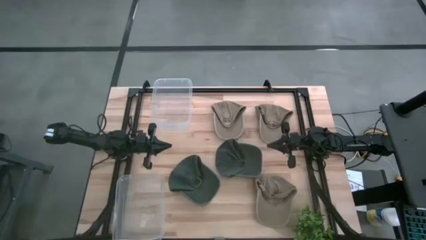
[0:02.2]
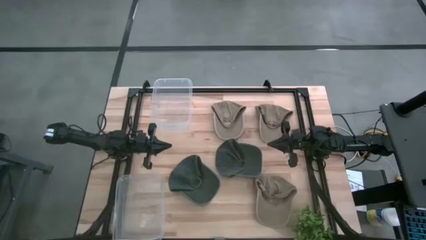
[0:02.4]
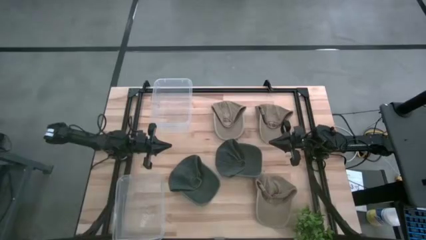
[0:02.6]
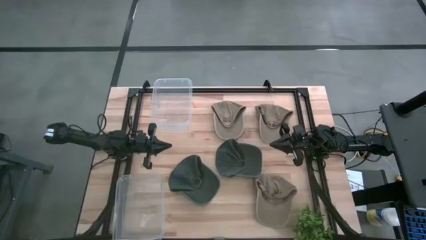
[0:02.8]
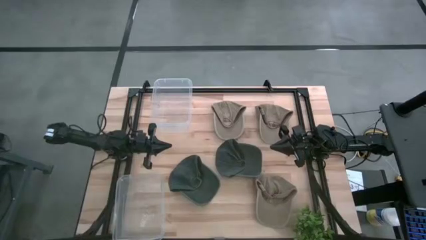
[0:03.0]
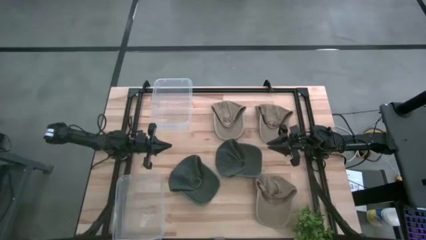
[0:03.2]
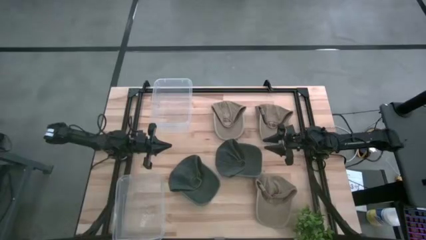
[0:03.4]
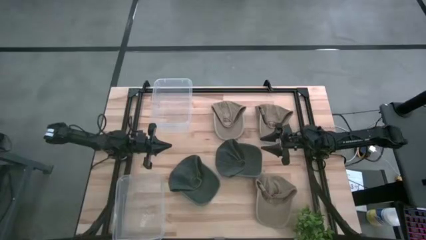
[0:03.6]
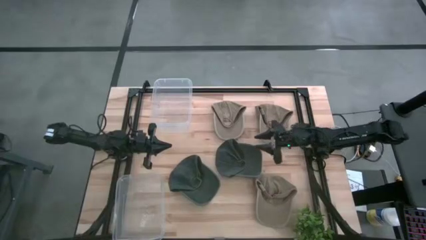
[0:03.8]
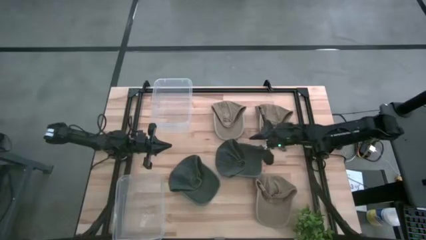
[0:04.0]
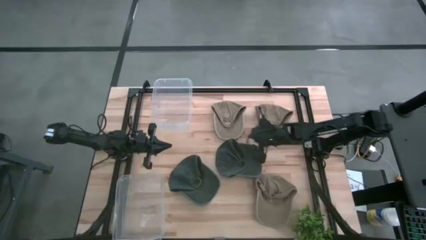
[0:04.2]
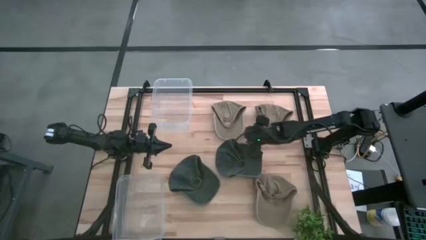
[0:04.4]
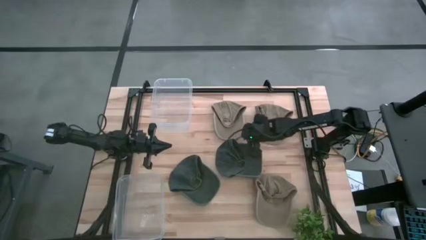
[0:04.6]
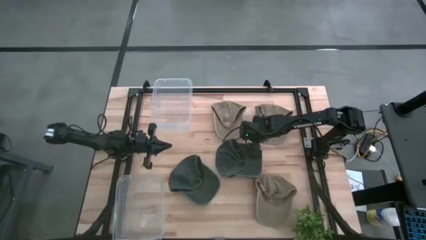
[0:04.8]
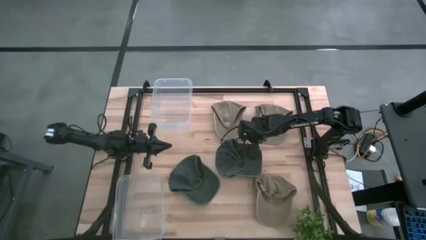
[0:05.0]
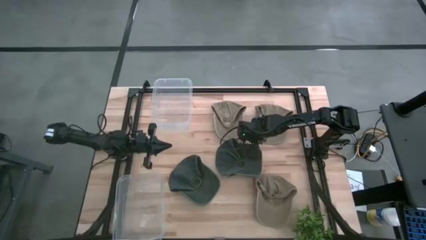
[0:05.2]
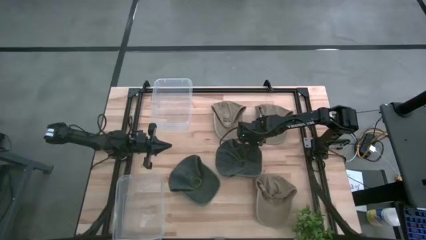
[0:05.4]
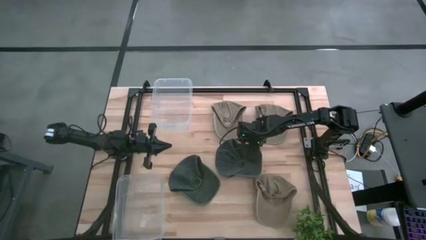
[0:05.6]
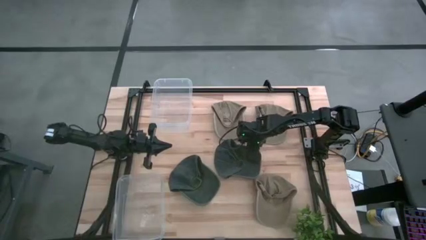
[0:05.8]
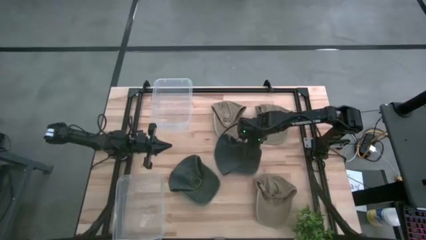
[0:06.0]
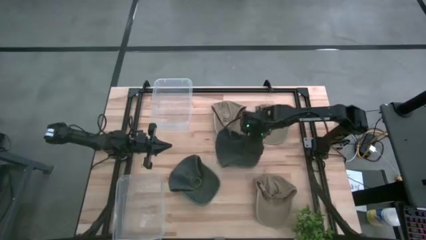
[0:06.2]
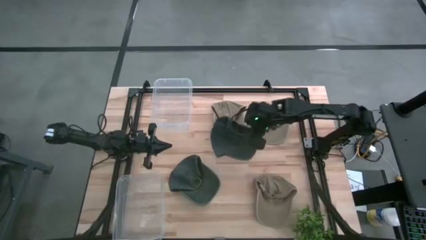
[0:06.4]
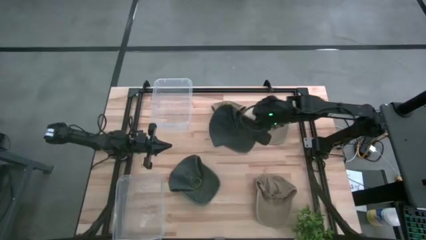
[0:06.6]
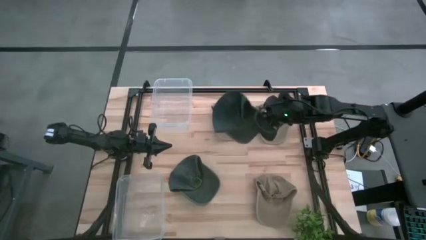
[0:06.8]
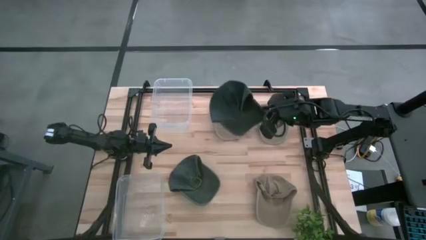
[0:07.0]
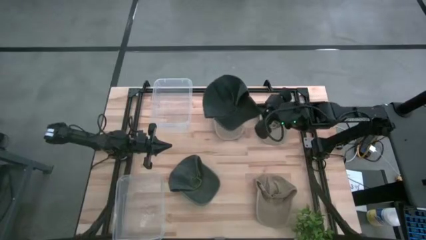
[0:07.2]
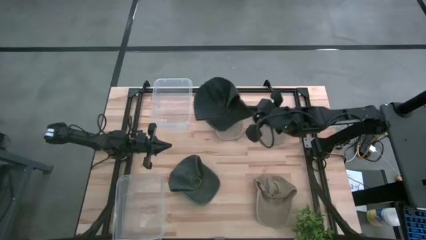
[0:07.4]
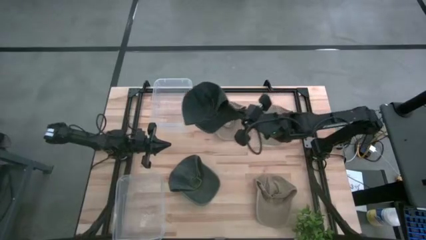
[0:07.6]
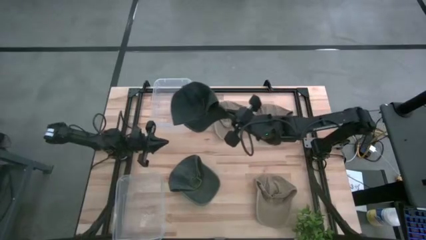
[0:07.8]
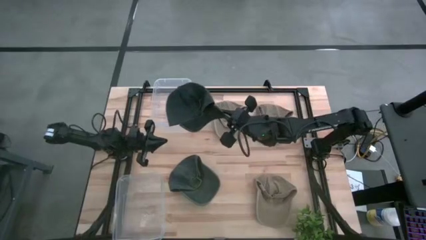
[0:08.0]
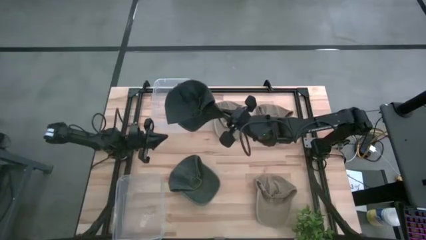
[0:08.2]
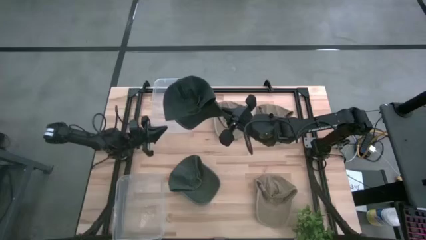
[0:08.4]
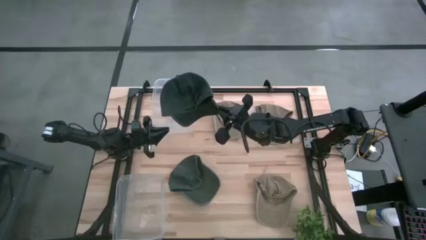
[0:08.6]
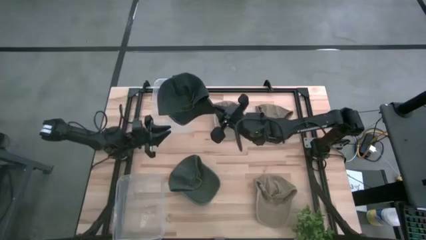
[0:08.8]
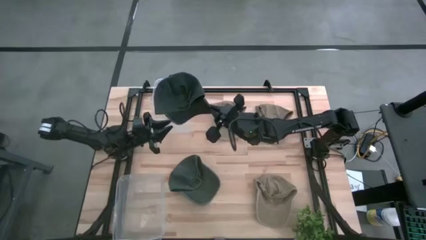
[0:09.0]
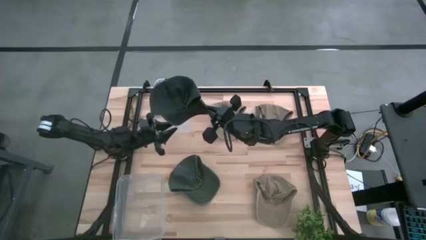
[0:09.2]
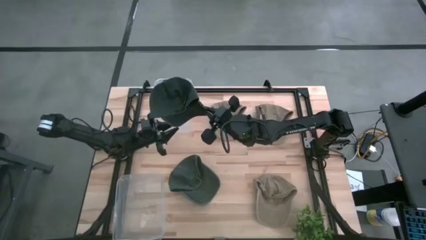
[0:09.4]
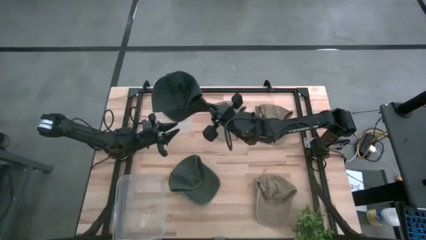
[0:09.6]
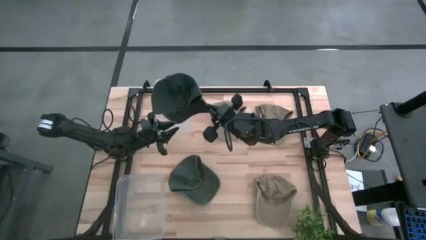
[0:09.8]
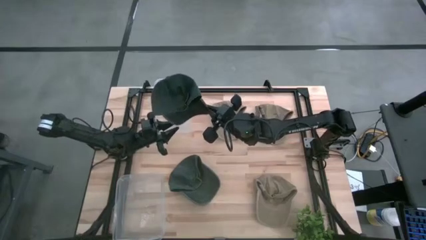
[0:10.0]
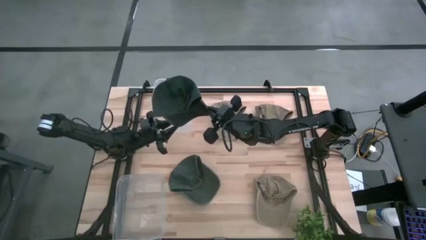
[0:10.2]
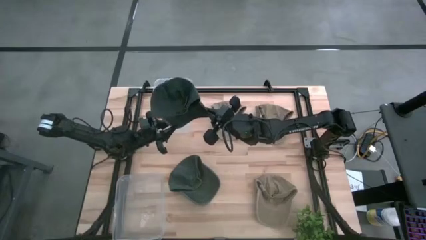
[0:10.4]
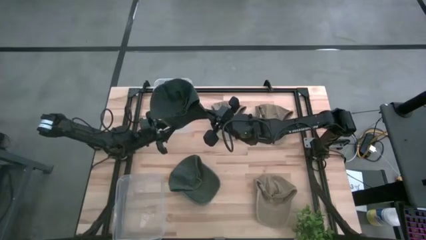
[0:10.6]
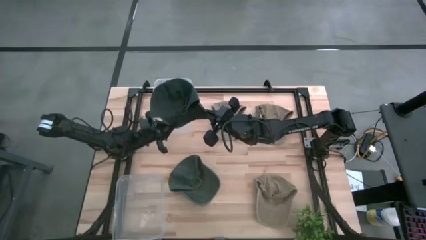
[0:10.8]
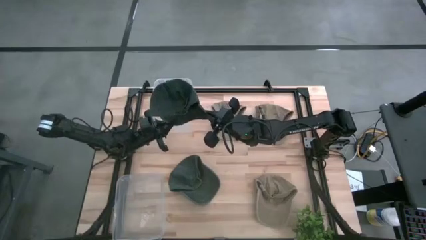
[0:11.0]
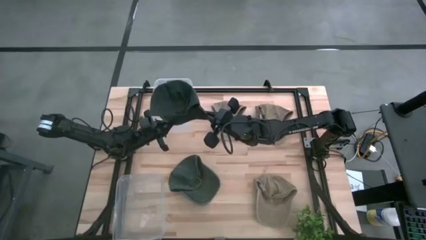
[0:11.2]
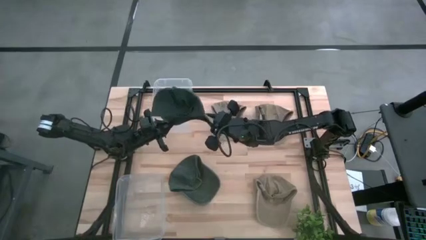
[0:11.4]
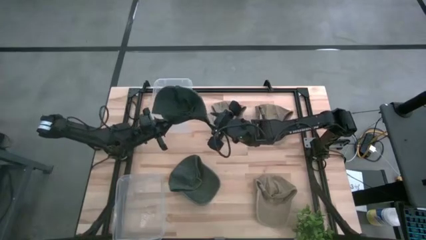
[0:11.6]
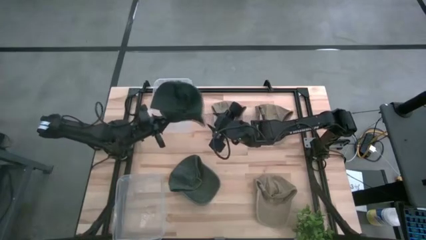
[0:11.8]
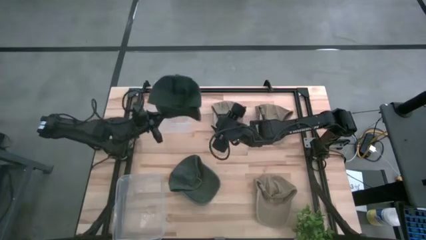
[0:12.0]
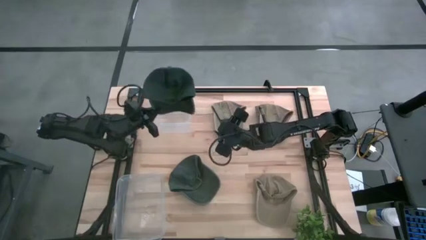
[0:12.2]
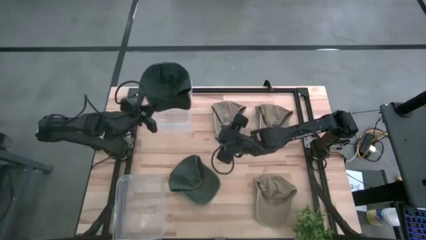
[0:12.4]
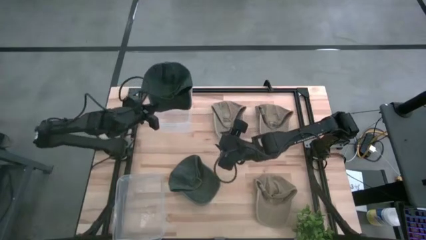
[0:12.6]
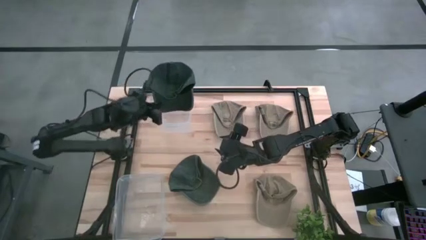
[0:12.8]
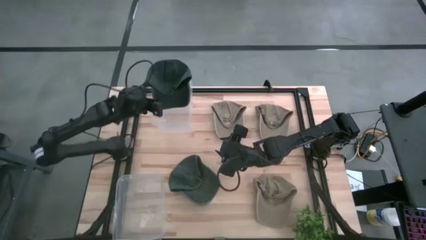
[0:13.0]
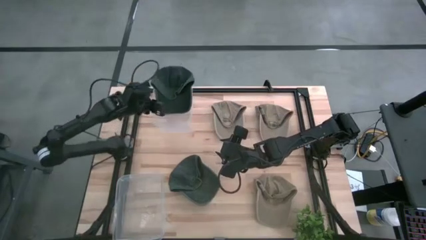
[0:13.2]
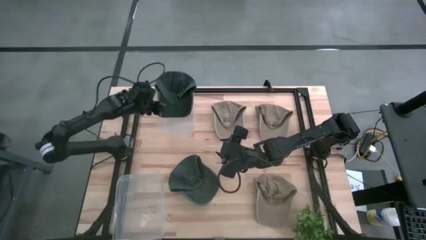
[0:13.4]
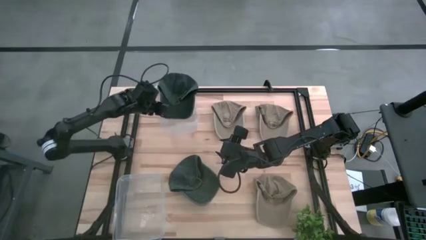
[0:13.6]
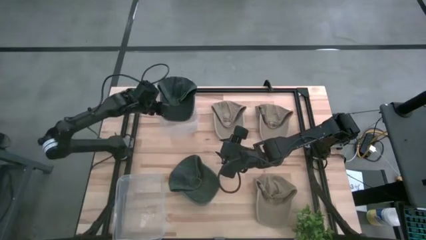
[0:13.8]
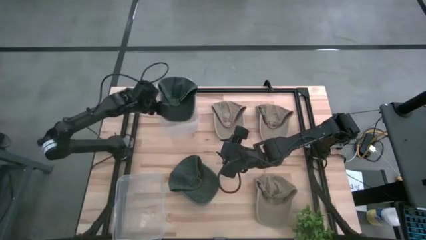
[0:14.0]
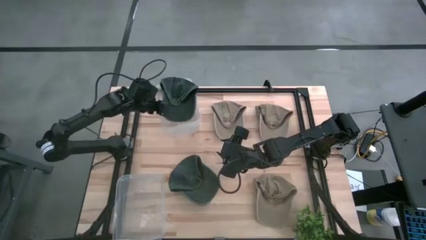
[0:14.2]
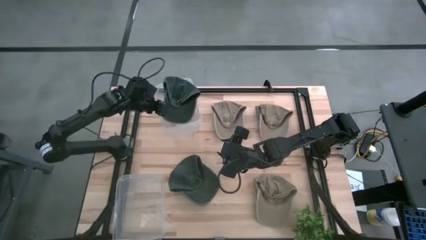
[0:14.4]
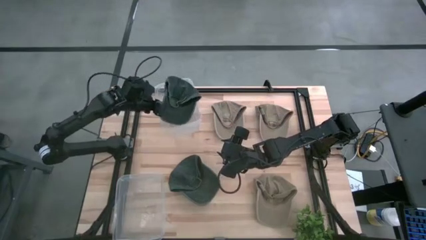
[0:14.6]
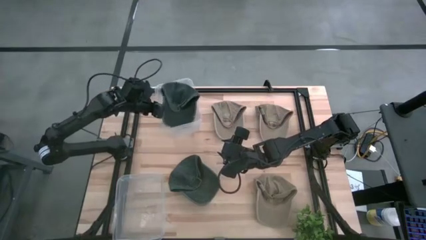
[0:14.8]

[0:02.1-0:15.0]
Task: Pick & Place hat
Put the right blue cap into the top transparent bin
